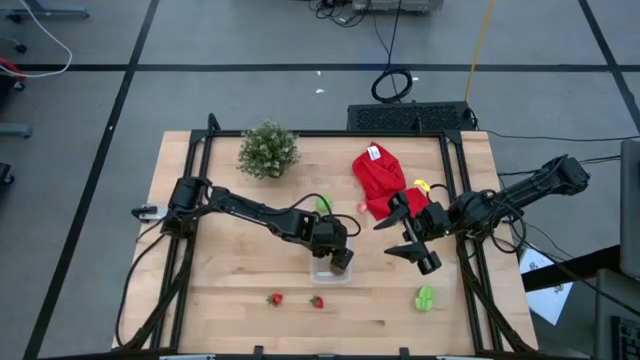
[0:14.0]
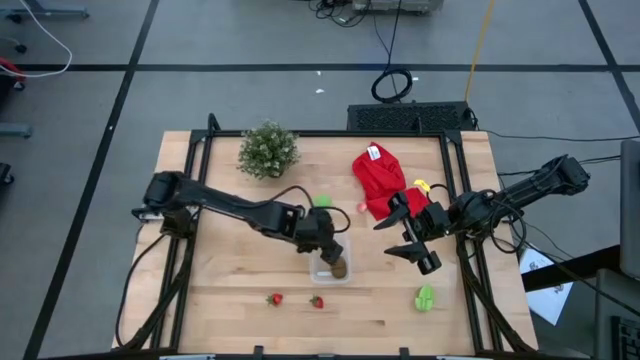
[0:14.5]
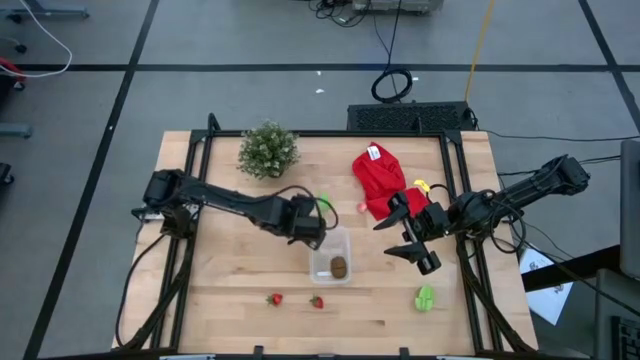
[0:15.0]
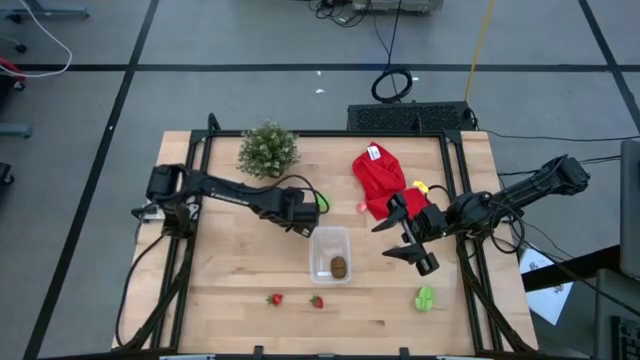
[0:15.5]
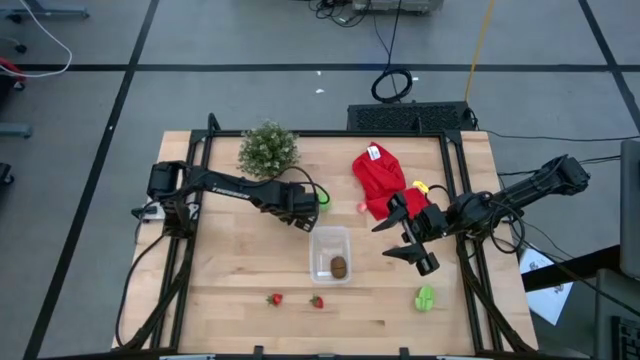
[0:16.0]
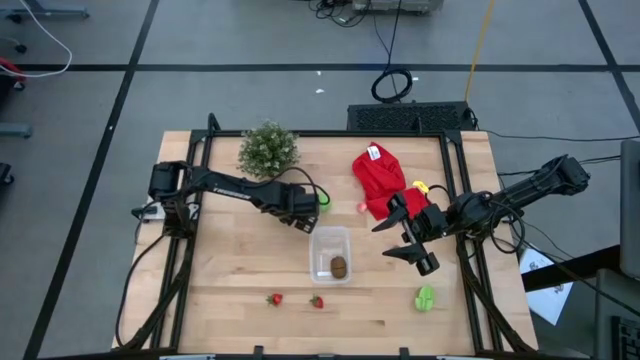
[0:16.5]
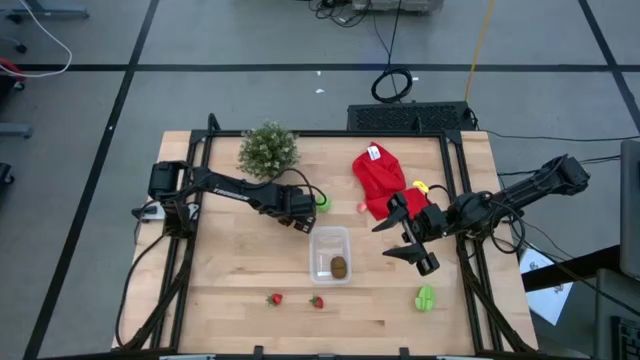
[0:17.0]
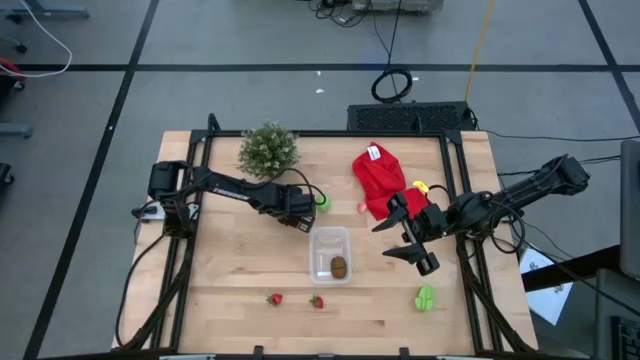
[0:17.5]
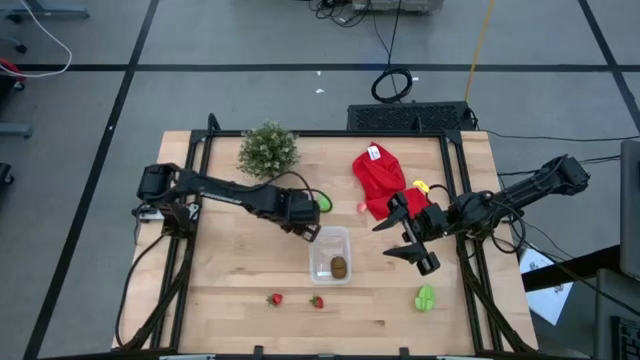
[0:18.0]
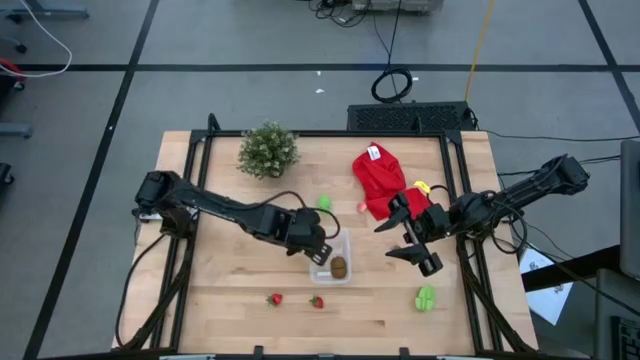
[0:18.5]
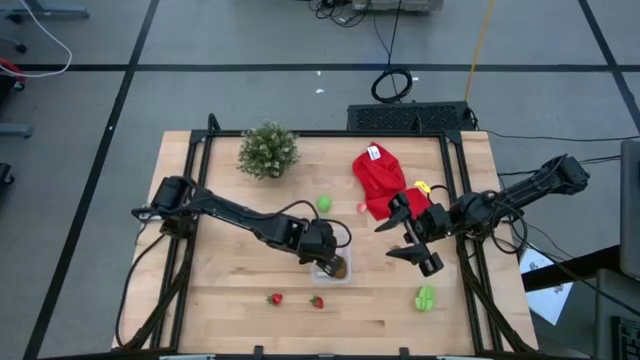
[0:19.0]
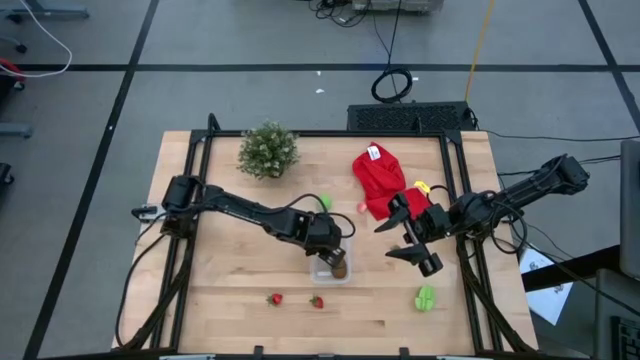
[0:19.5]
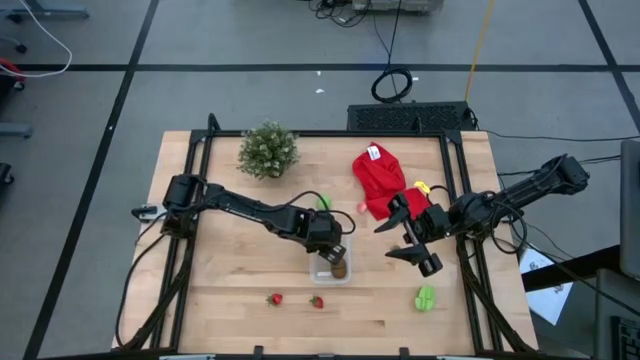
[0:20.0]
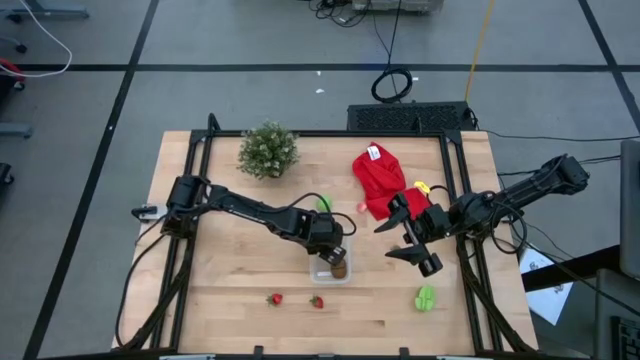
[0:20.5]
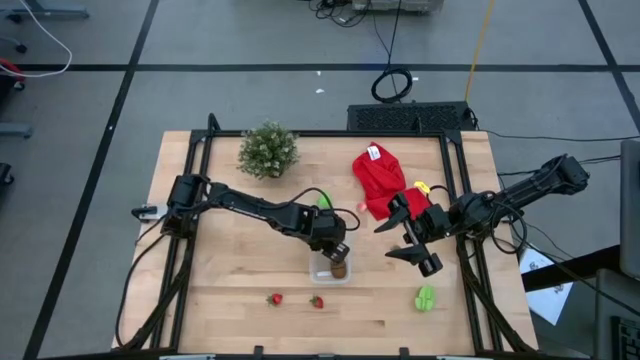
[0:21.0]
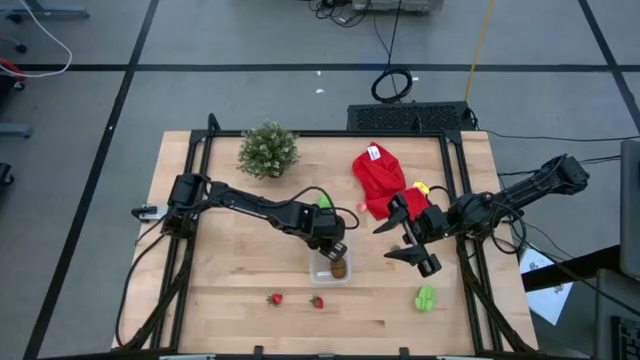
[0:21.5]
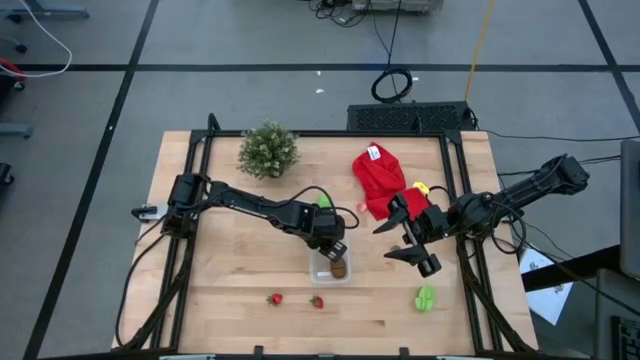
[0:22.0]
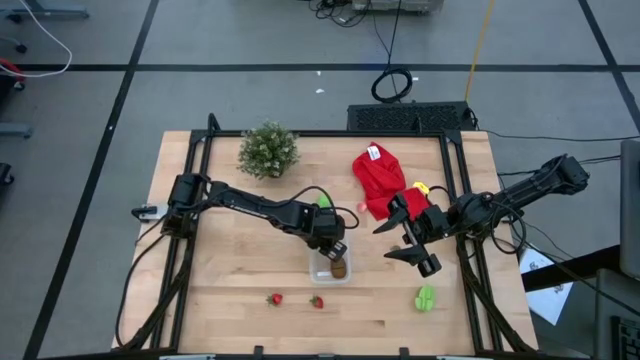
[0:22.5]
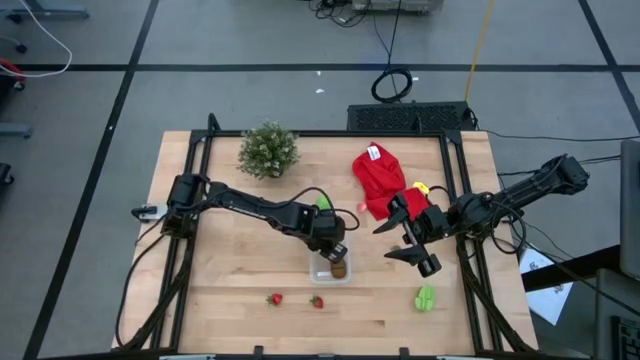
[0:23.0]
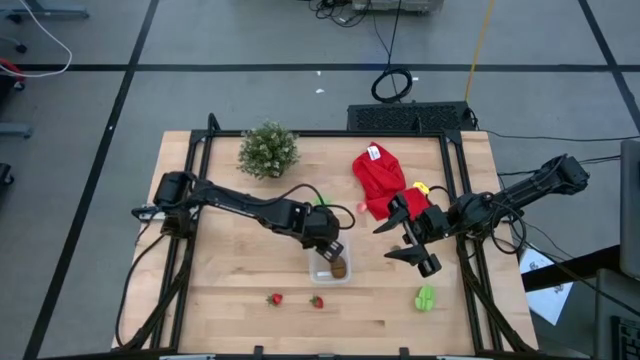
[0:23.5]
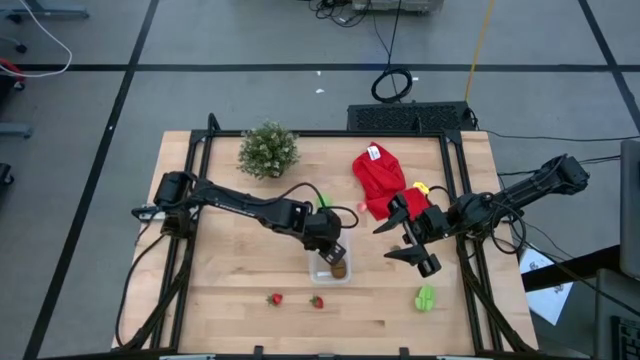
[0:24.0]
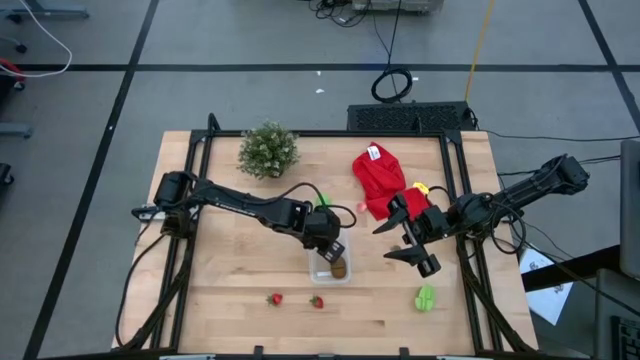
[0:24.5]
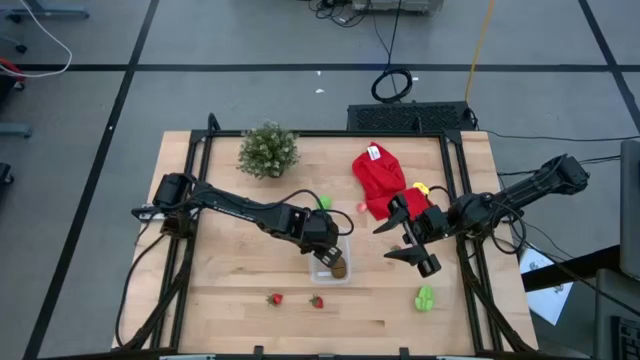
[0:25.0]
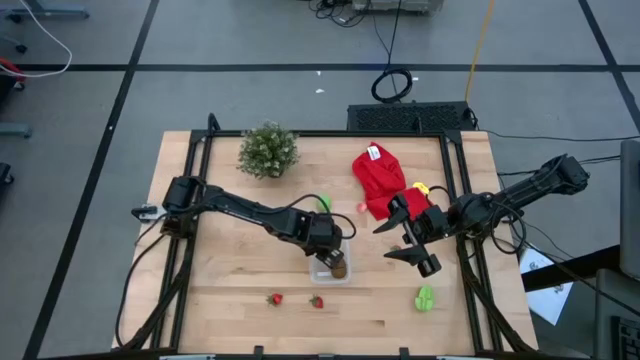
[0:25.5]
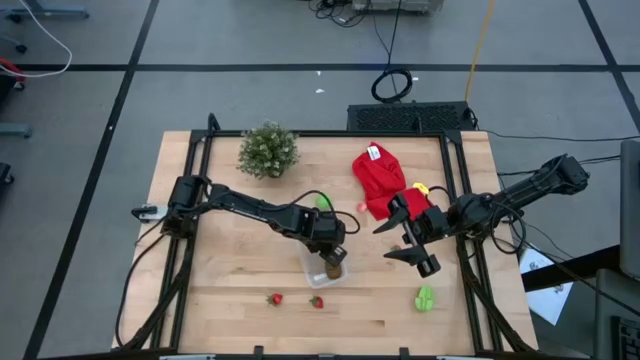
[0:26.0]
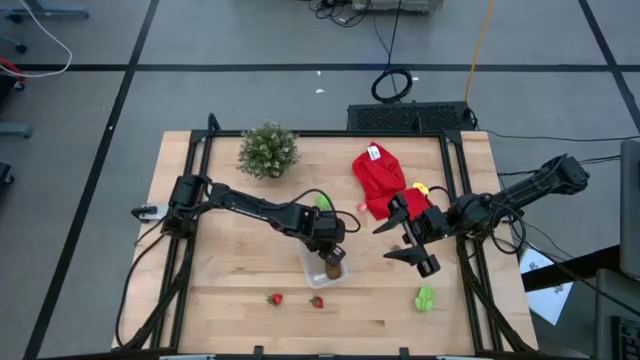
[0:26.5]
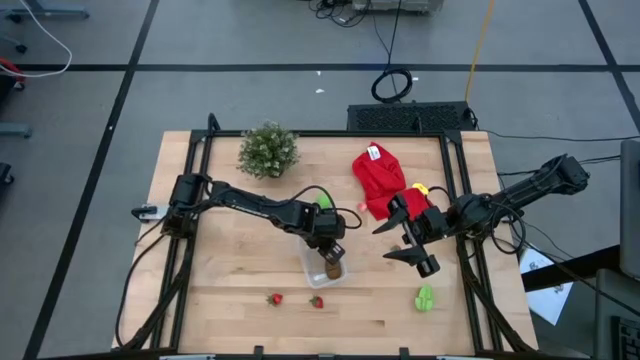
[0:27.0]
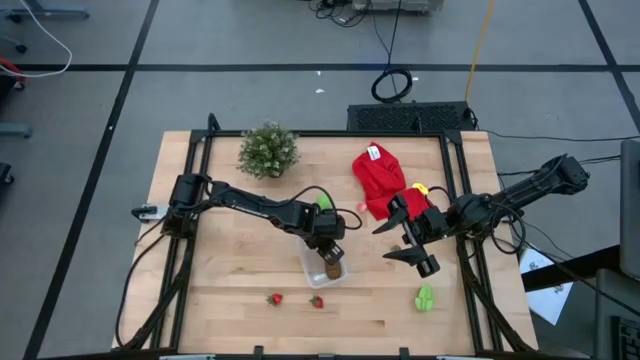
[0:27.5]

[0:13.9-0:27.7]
Task: Pick and placing Produce into tupperware
Put the left pink peach into the transparent bin

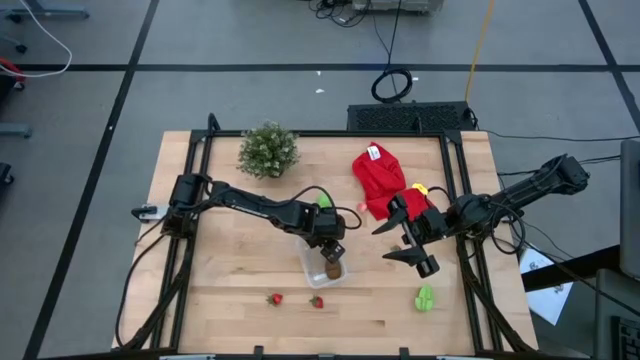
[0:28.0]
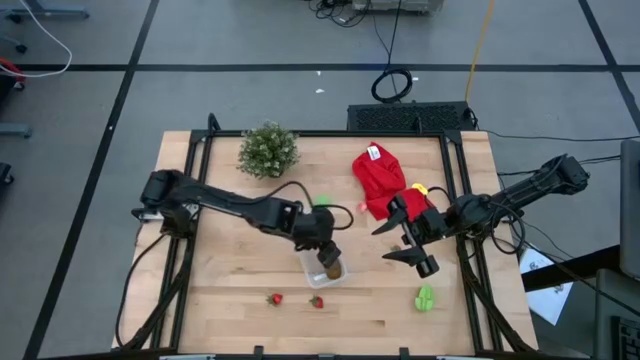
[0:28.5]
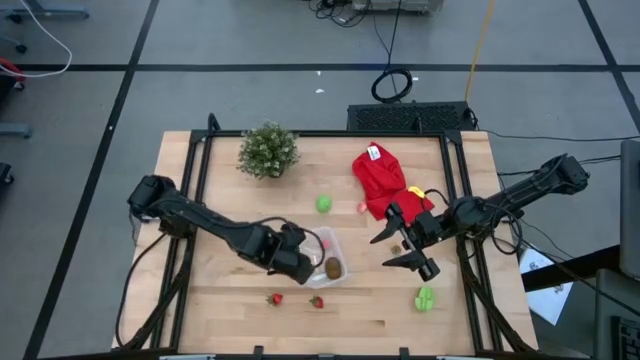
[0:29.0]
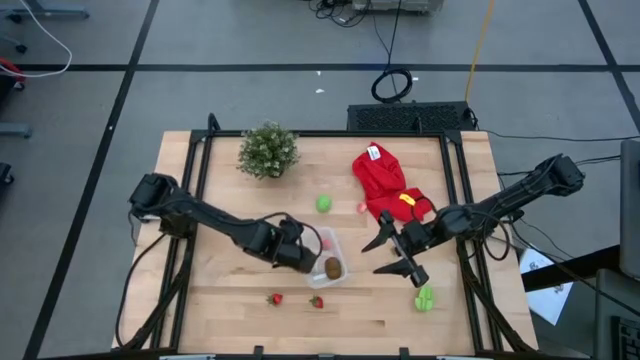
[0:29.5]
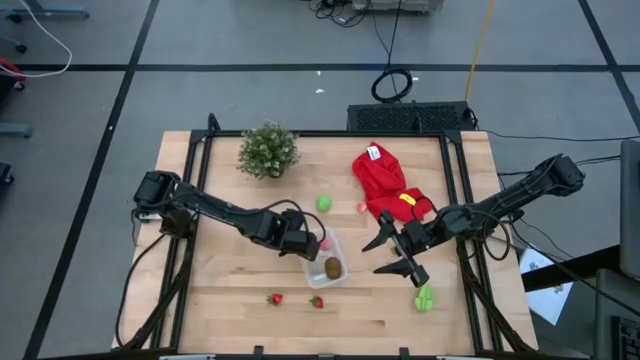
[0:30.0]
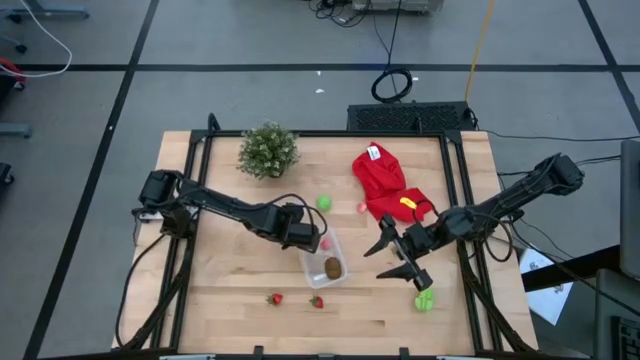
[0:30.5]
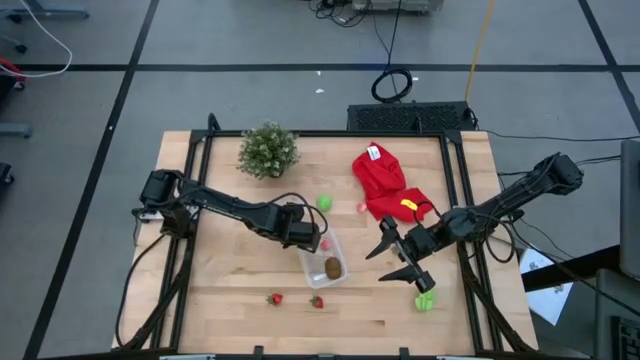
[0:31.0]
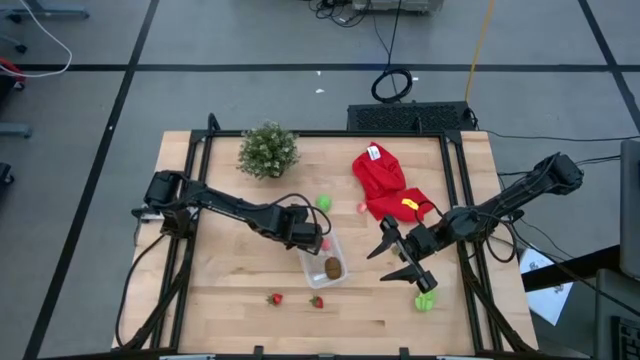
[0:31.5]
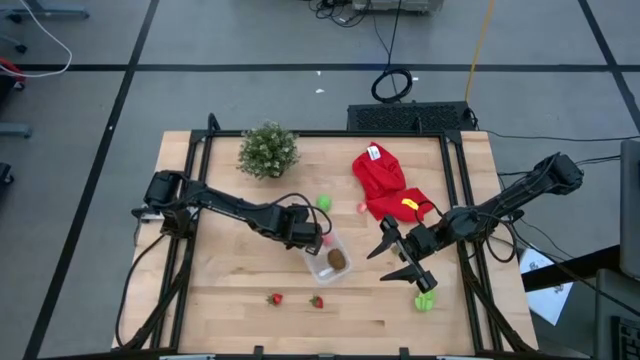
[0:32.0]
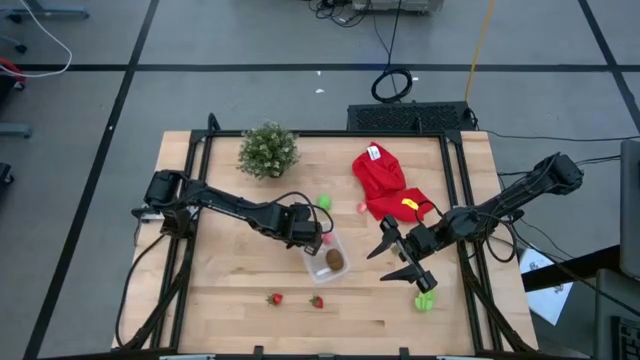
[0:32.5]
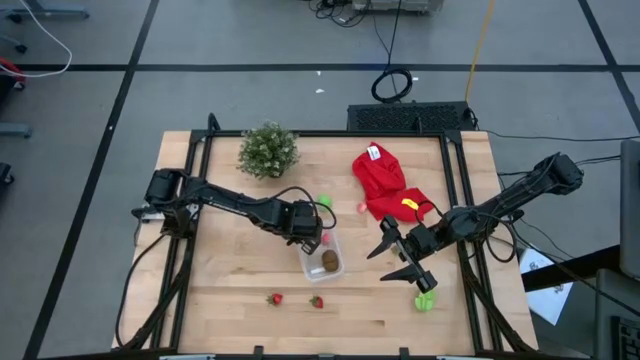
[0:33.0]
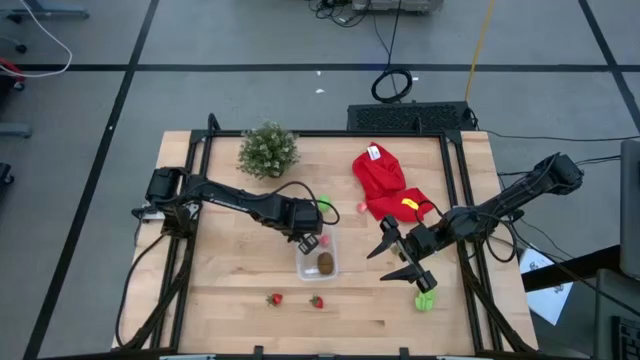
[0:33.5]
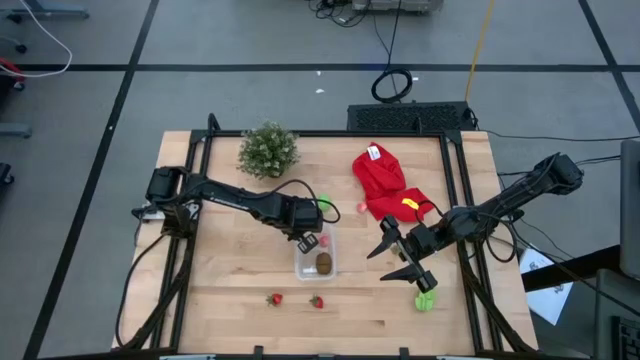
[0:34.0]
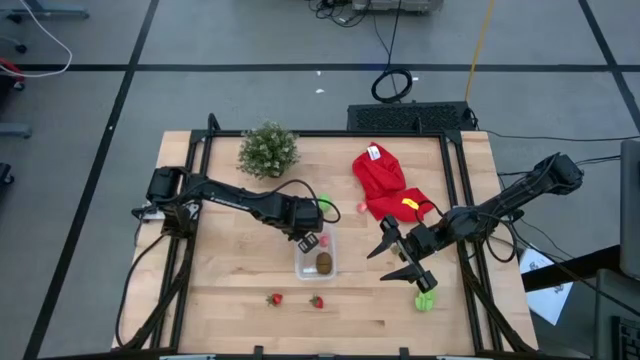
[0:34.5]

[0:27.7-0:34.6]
Adjust the transparent bin

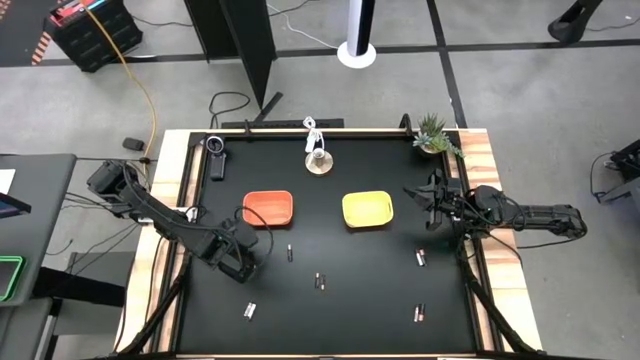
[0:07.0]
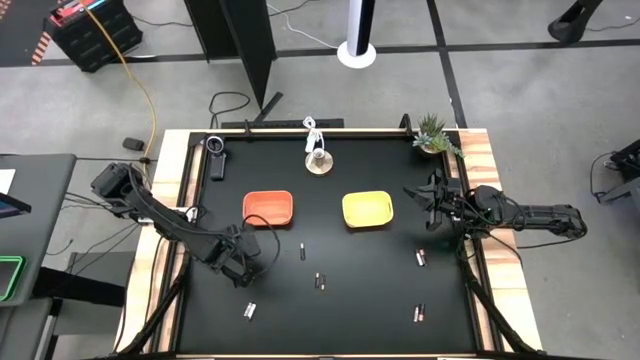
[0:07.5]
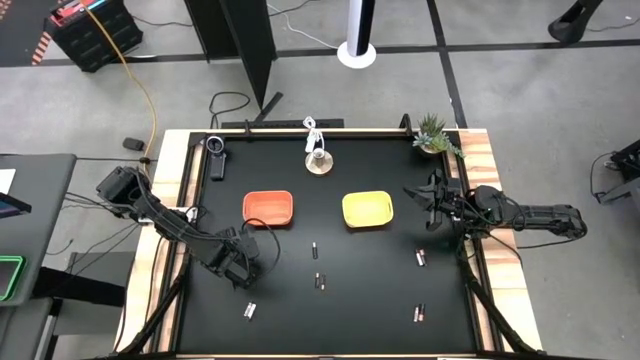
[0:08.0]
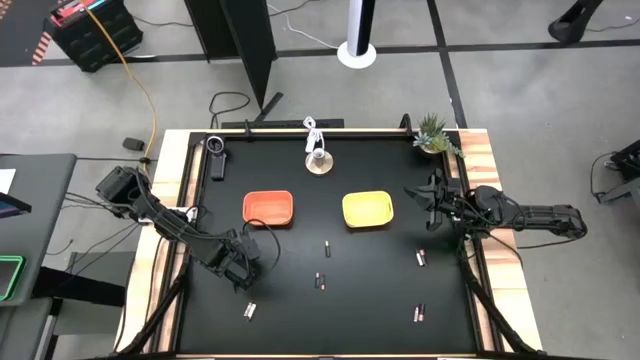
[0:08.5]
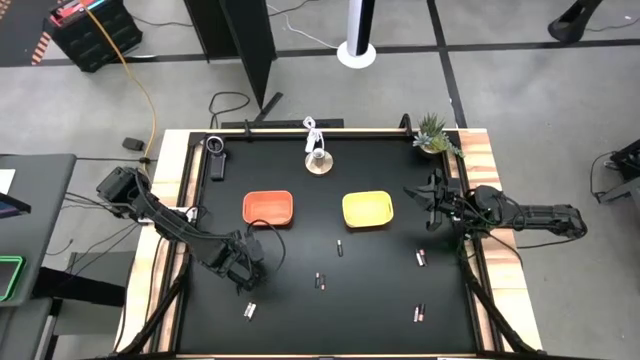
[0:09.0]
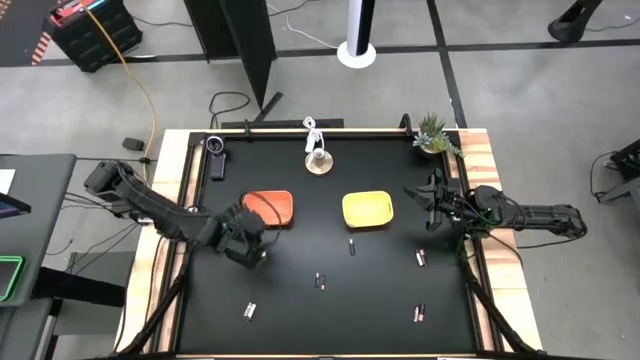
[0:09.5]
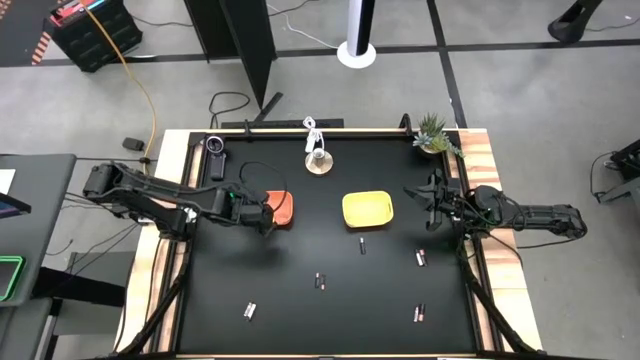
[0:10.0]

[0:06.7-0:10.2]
Task: Sort batteries
Put the silver battery into the orange bin
